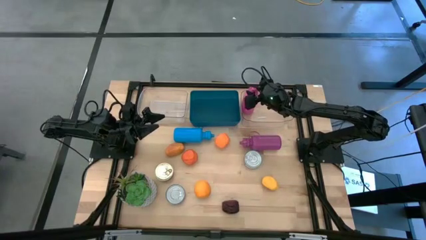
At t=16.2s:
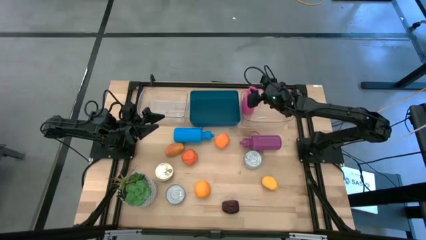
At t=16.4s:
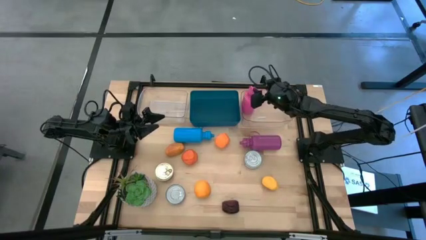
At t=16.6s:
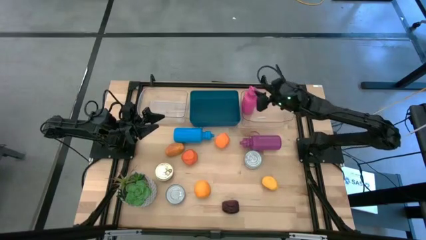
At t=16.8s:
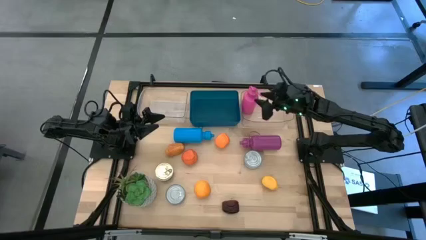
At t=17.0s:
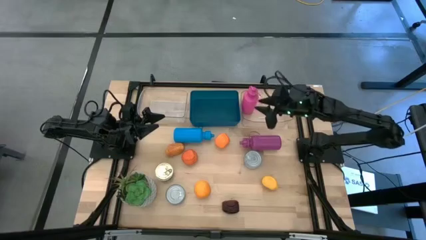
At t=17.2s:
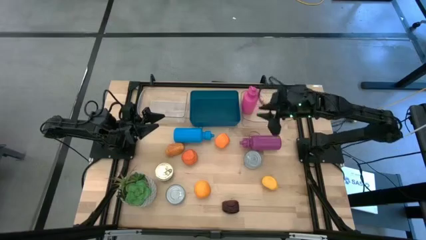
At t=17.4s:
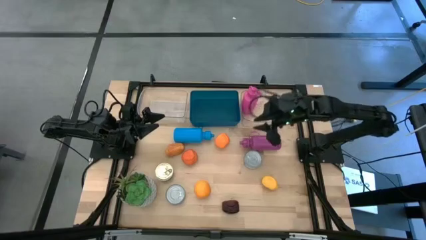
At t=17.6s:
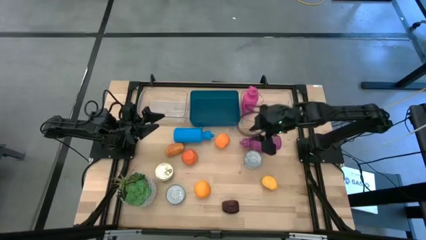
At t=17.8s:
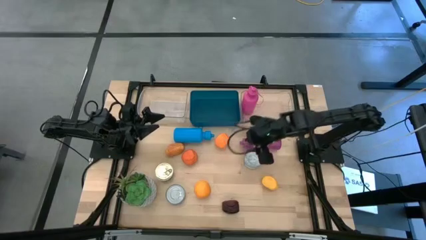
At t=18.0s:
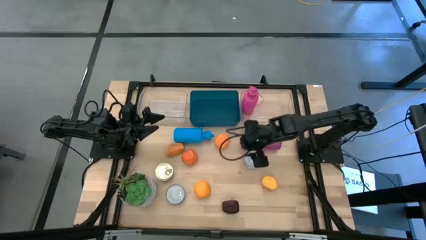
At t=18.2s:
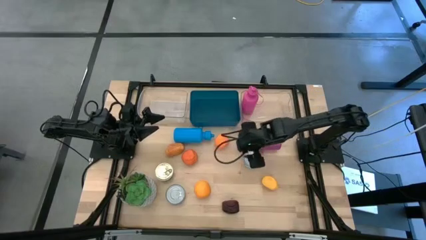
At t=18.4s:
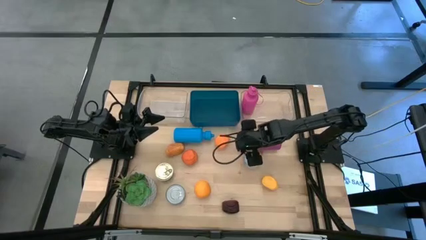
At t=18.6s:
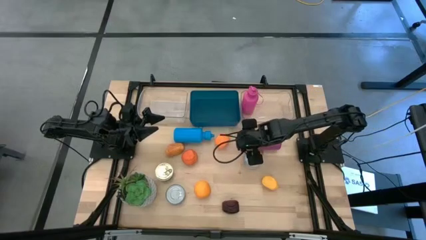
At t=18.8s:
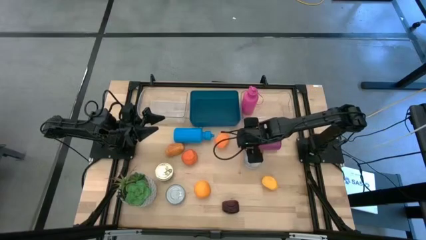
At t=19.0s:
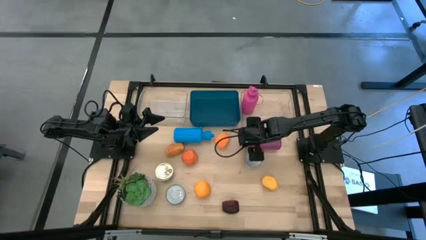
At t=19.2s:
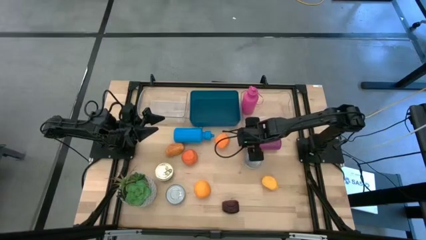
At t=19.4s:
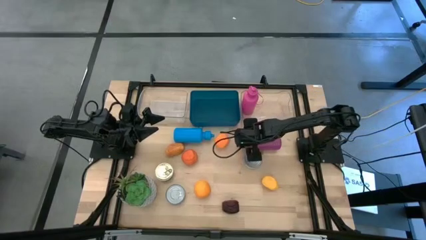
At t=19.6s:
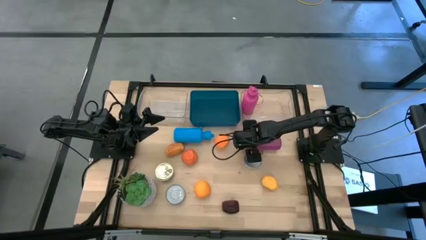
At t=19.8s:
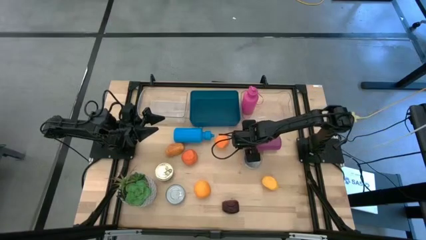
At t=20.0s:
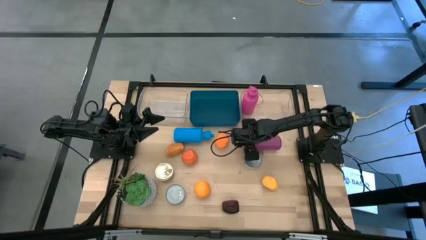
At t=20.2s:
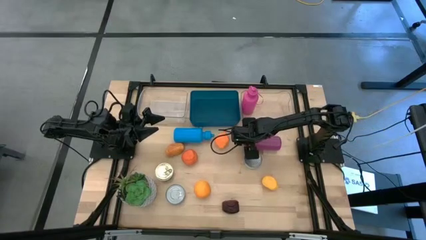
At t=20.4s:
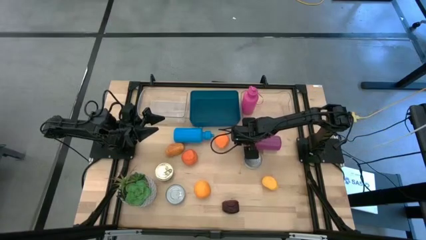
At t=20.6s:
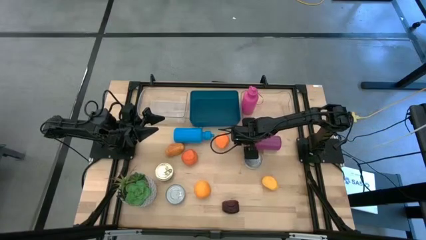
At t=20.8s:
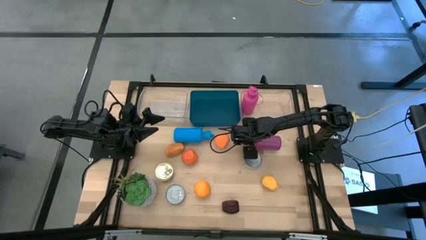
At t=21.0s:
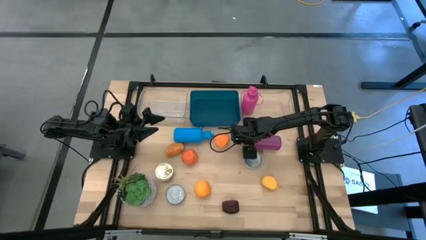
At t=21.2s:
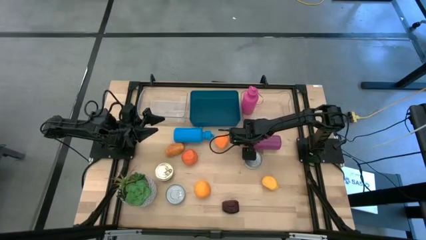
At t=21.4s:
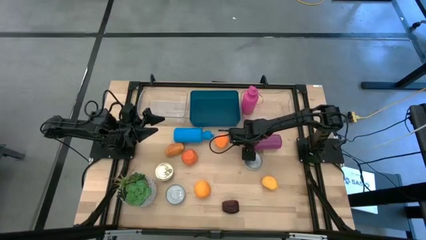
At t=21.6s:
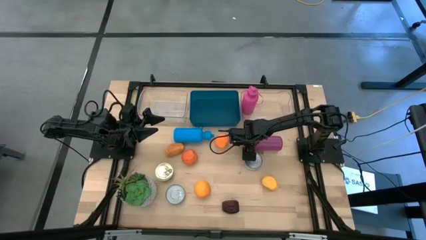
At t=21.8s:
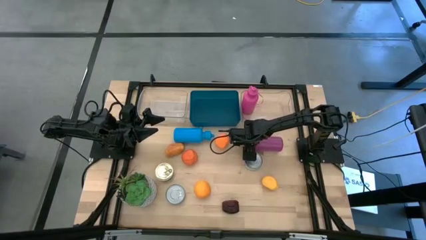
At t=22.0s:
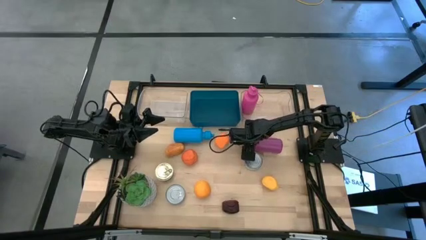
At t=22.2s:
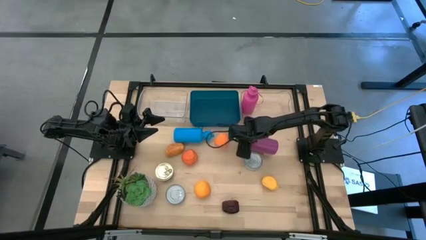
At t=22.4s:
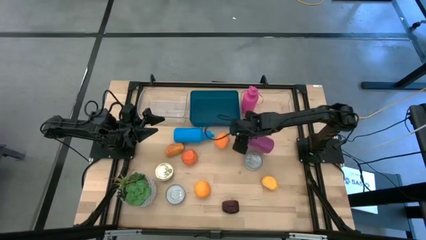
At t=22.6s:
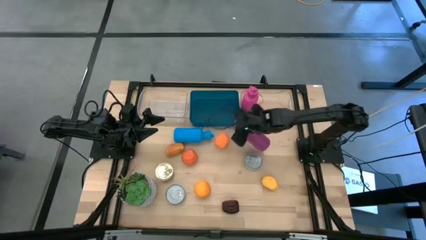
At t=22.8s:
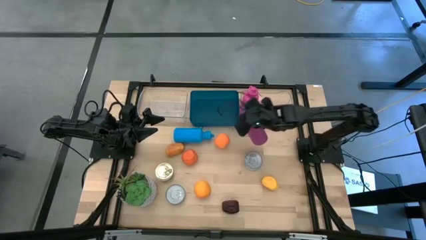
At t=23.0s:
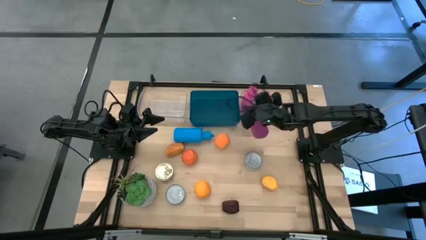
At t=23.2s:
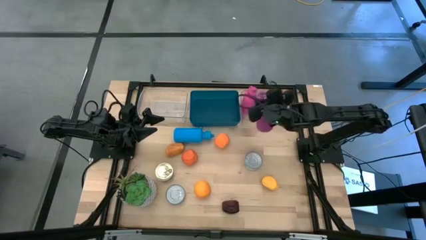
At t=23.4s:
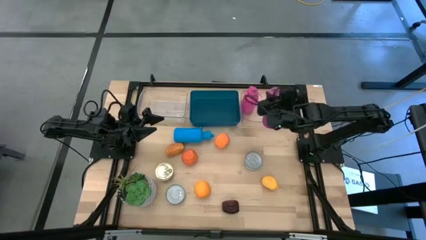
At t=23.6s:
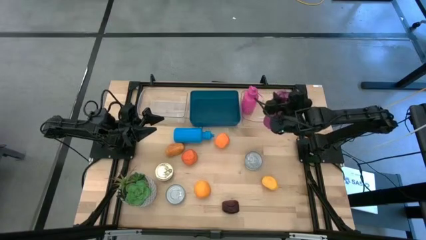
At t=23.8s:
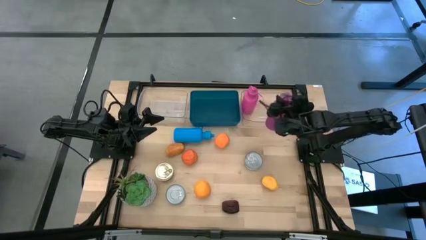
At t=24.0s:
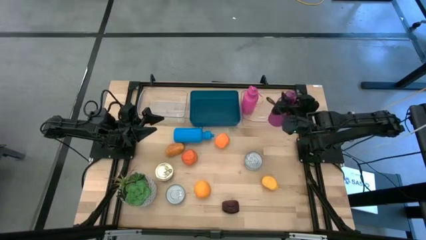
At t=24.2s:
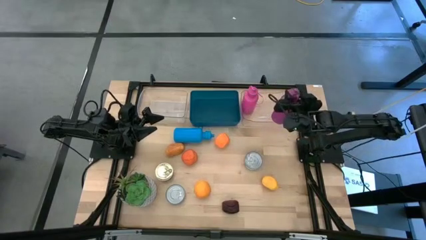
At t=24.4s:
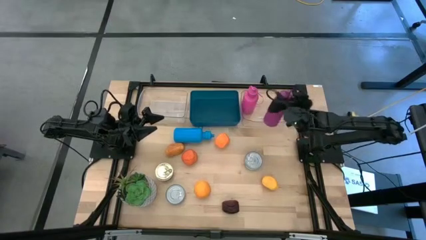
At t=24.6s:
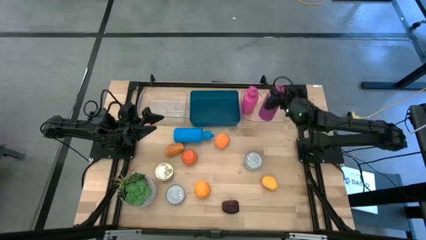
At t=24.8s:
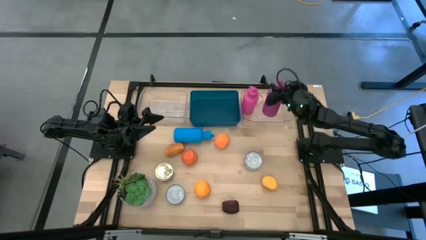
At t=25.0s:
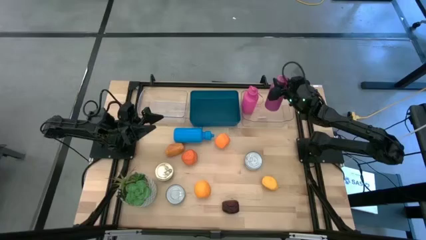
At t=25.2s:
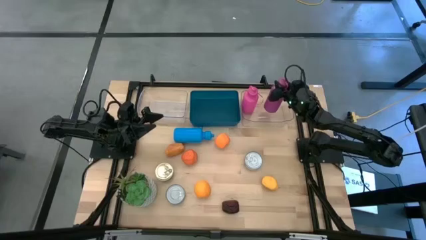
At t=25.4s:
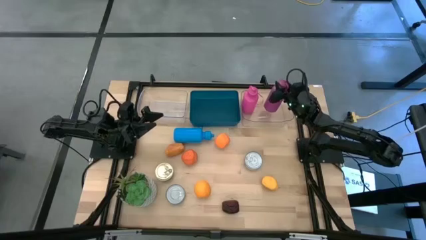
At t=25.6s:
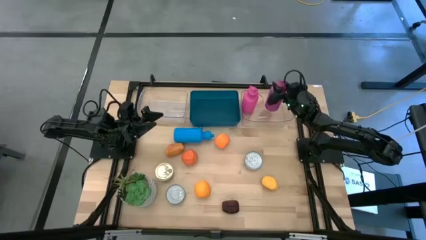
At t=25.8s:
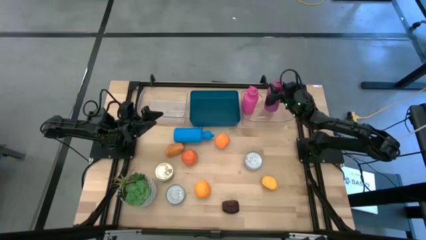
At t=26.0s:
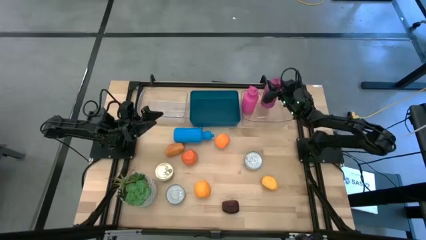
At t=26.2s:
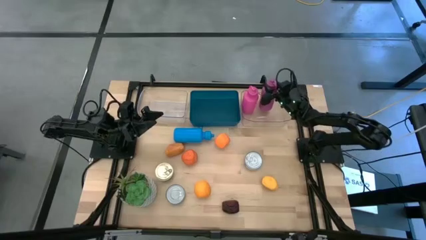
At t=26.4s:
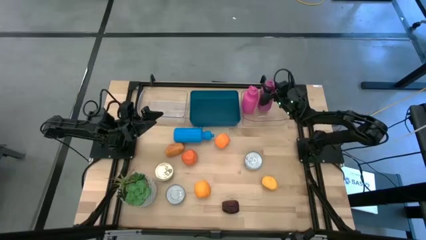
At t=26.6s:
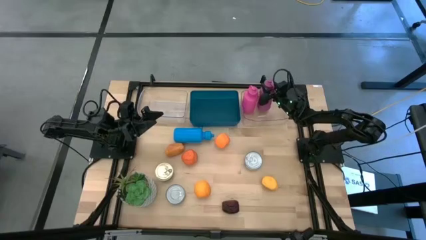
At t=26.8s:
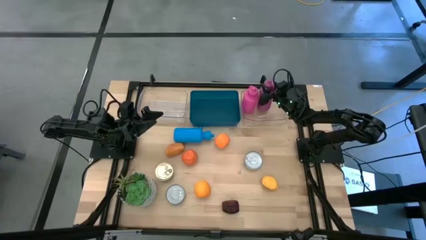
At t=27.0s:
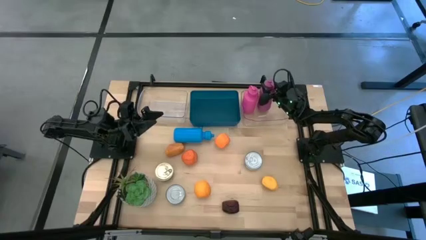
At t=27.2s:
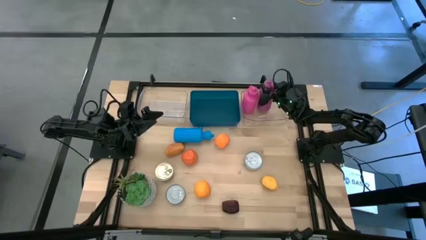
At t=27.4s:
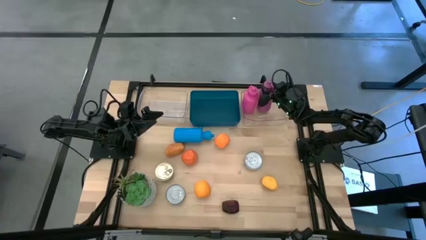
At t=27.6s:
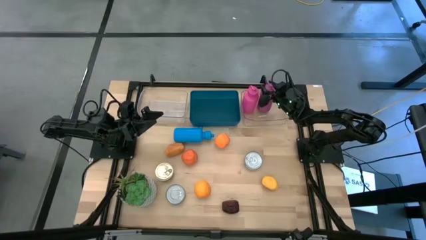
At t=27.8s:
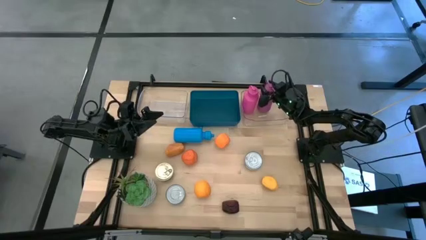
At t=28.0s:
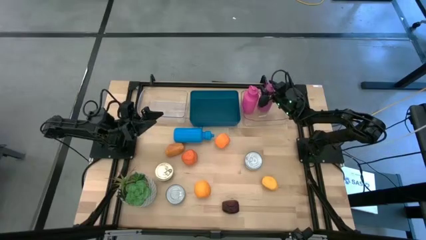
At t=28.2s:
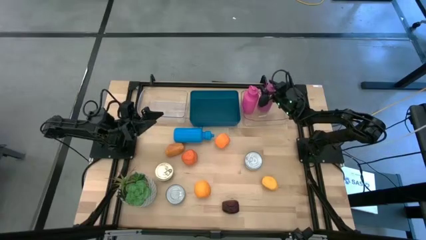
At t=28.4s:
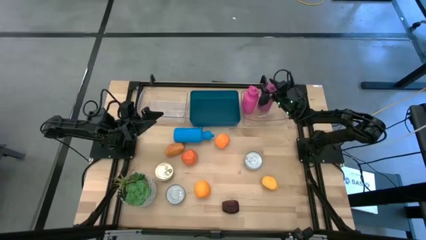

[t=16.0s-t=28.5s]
Task: Pick & Place Food Item
Put the purple tumbler into the right transparent bin
